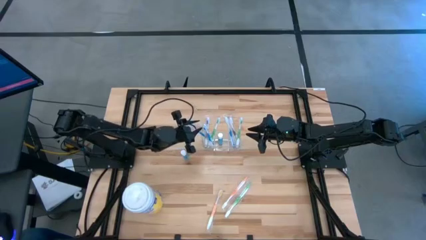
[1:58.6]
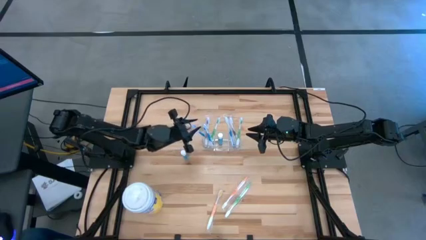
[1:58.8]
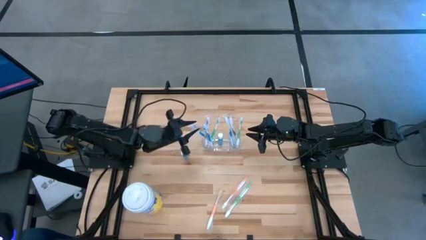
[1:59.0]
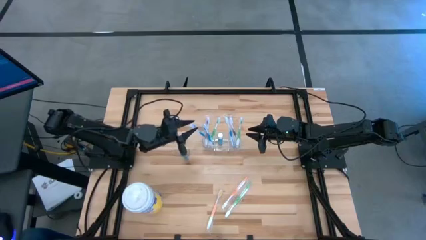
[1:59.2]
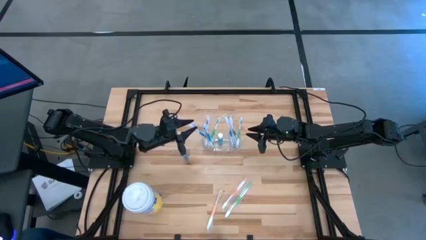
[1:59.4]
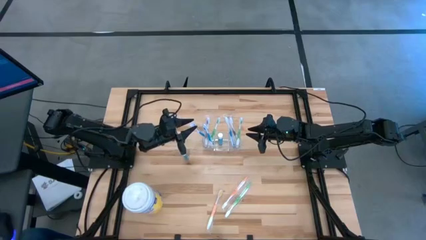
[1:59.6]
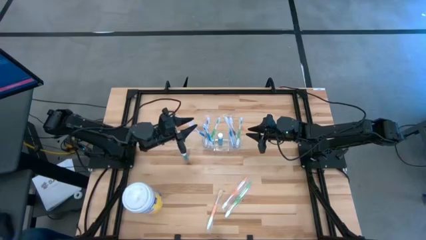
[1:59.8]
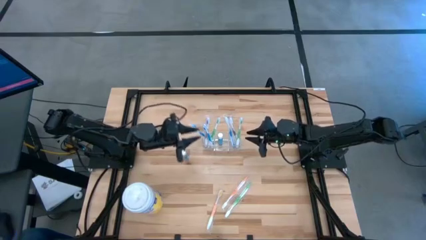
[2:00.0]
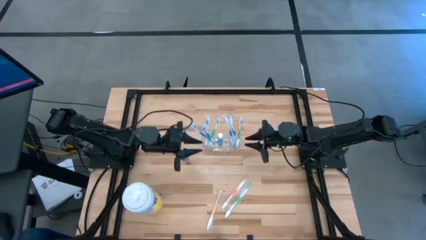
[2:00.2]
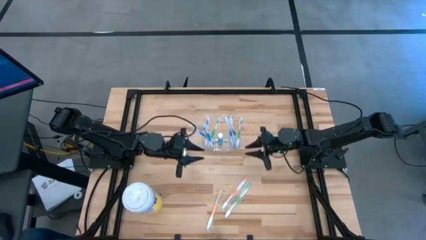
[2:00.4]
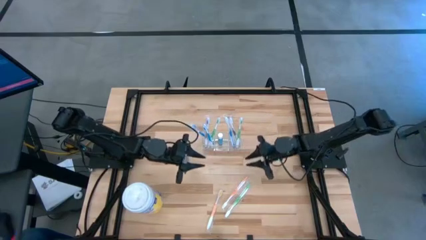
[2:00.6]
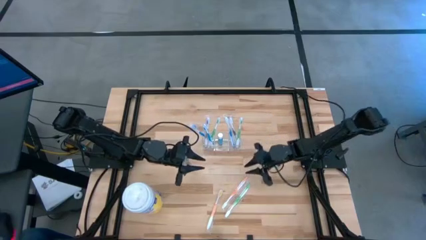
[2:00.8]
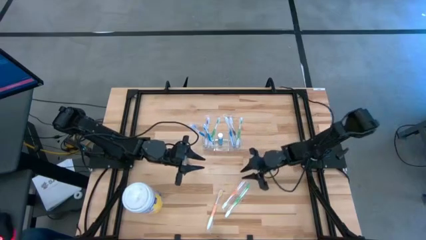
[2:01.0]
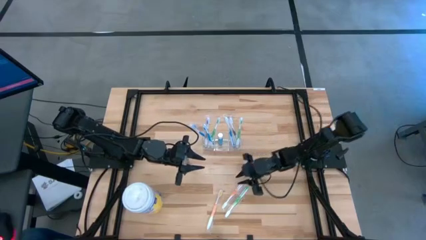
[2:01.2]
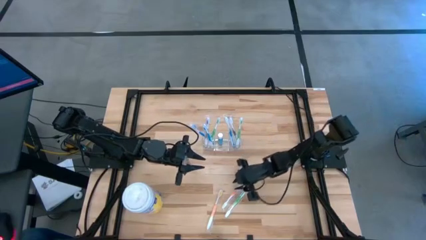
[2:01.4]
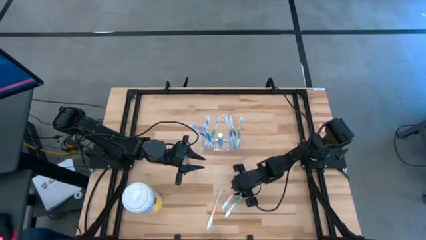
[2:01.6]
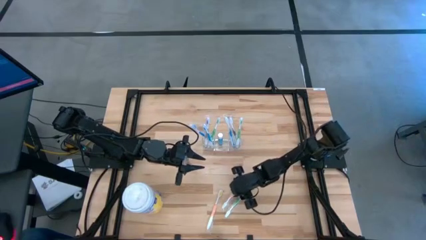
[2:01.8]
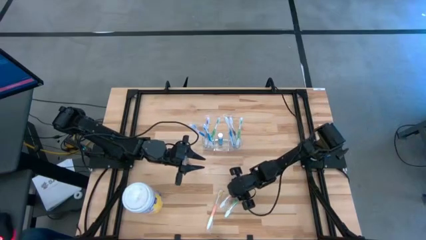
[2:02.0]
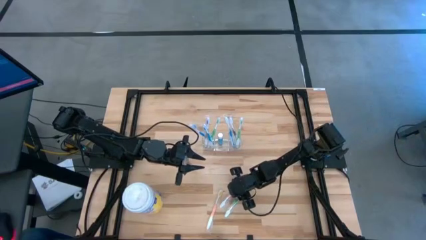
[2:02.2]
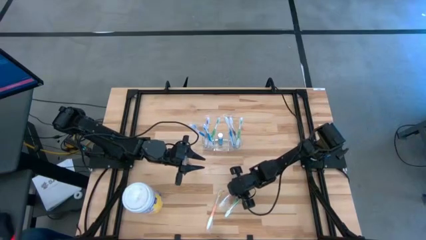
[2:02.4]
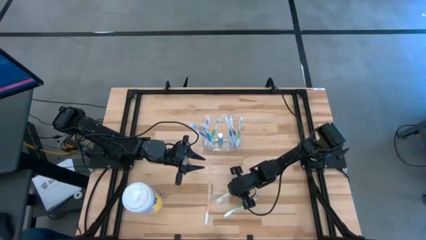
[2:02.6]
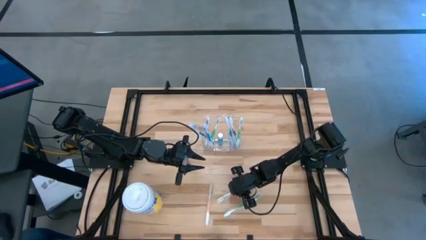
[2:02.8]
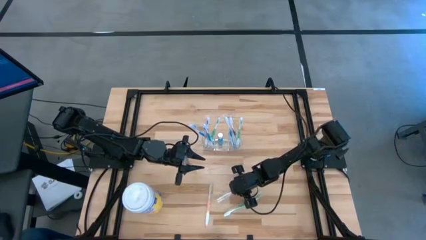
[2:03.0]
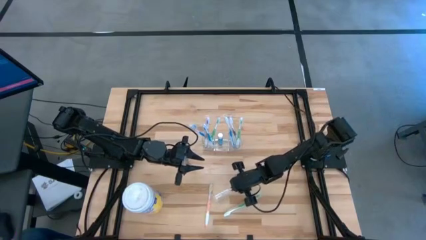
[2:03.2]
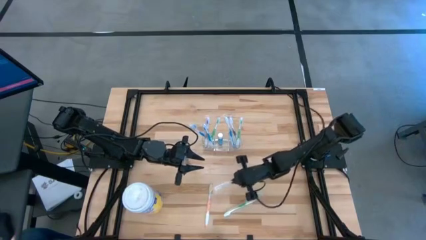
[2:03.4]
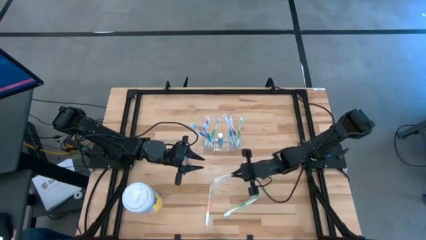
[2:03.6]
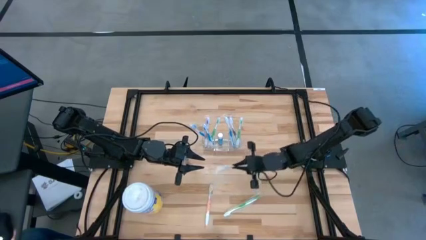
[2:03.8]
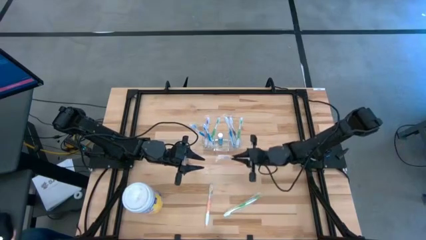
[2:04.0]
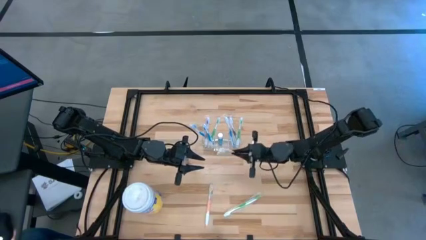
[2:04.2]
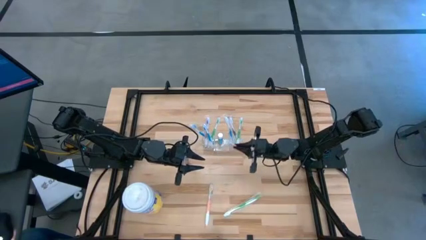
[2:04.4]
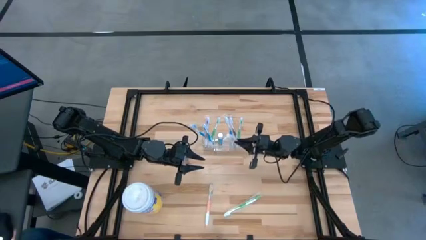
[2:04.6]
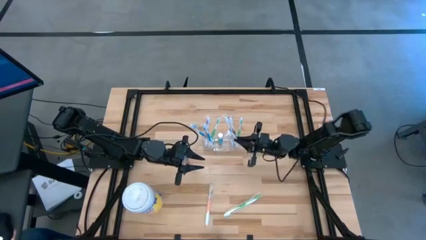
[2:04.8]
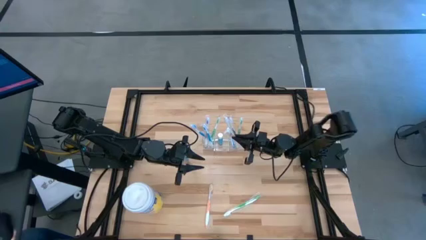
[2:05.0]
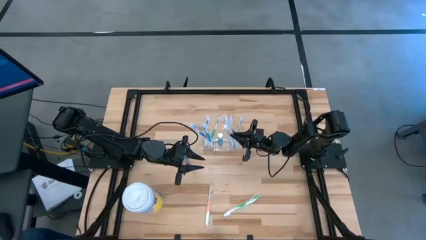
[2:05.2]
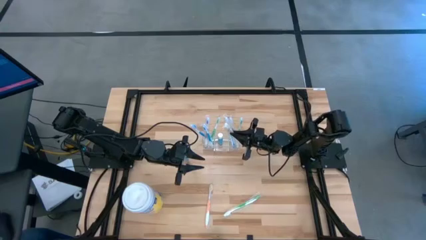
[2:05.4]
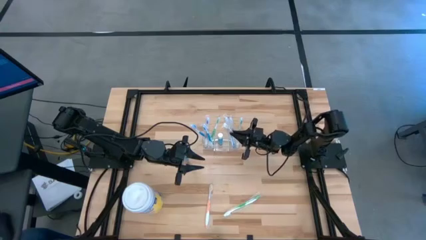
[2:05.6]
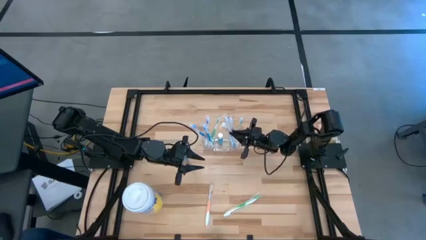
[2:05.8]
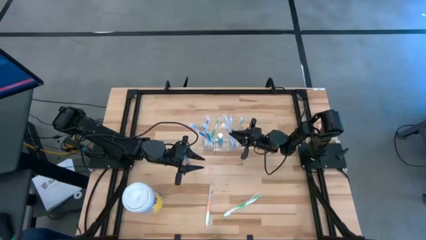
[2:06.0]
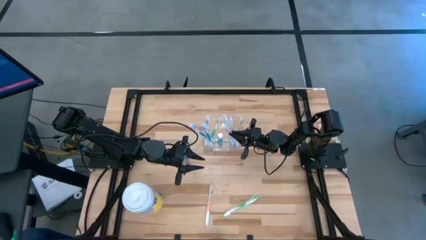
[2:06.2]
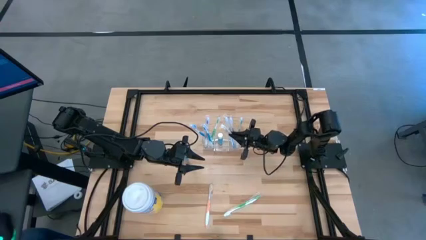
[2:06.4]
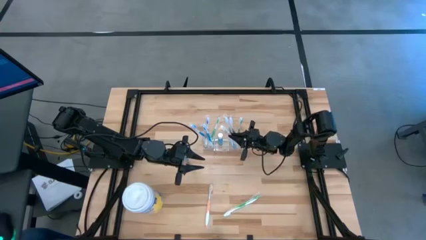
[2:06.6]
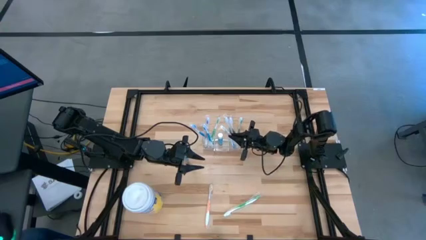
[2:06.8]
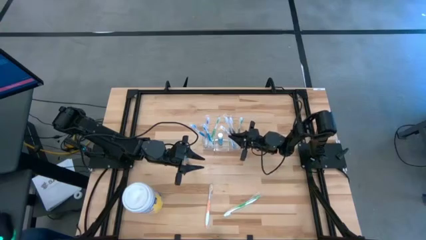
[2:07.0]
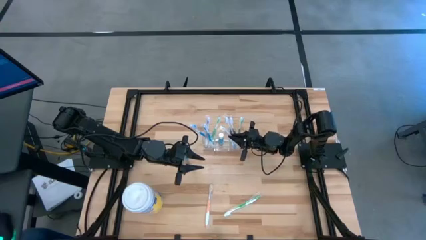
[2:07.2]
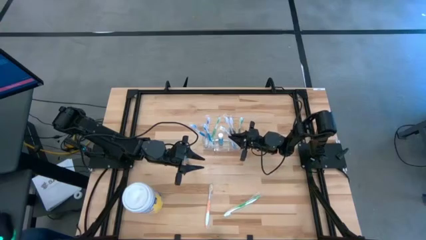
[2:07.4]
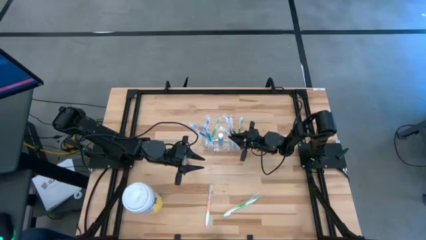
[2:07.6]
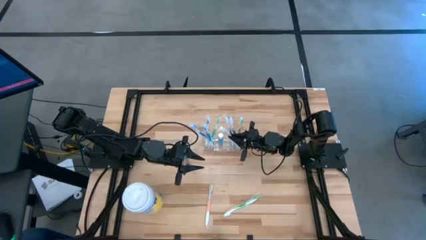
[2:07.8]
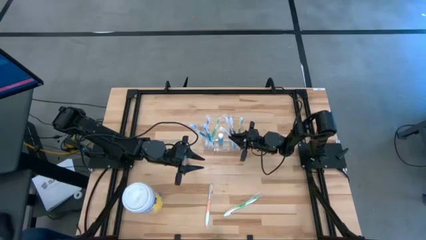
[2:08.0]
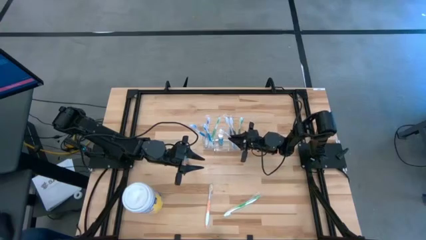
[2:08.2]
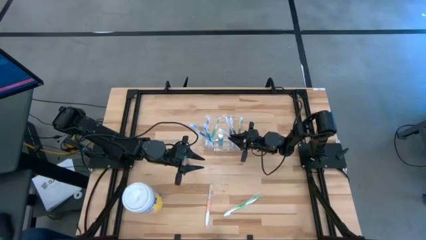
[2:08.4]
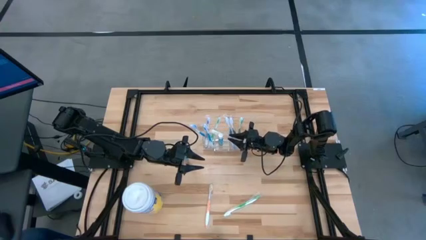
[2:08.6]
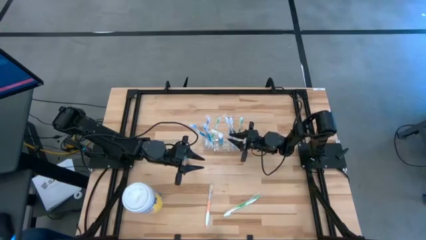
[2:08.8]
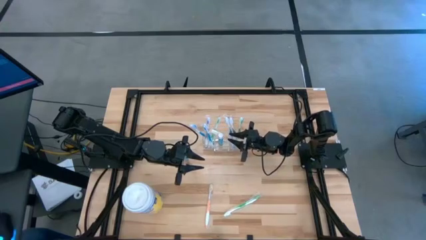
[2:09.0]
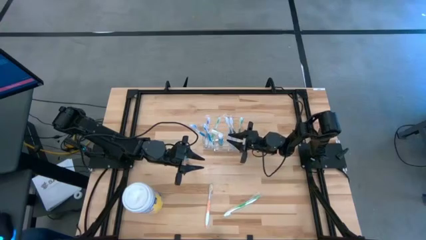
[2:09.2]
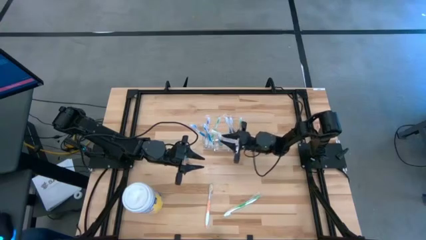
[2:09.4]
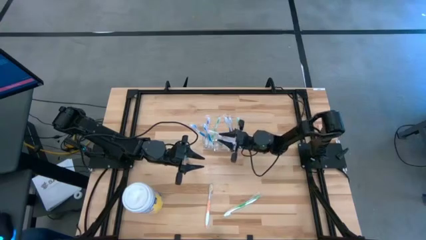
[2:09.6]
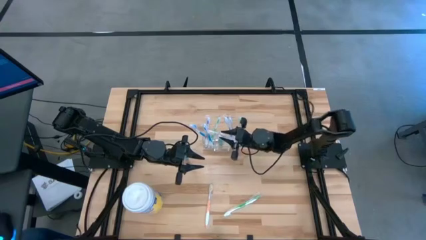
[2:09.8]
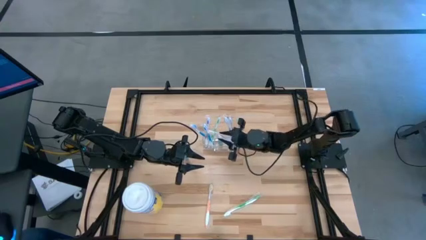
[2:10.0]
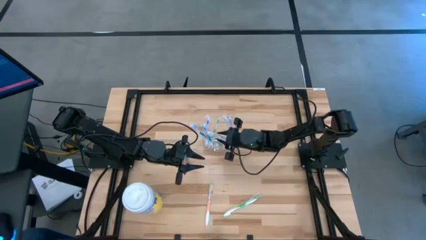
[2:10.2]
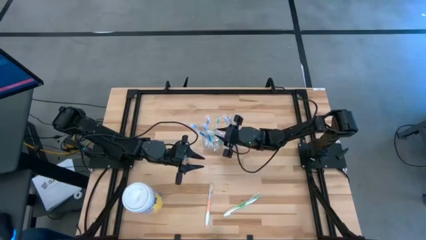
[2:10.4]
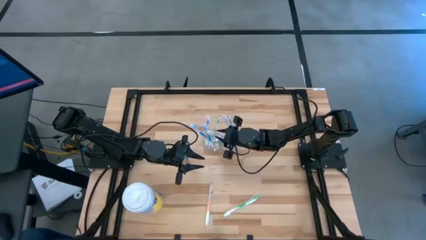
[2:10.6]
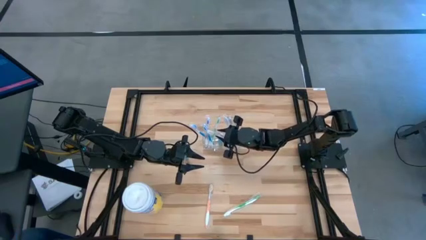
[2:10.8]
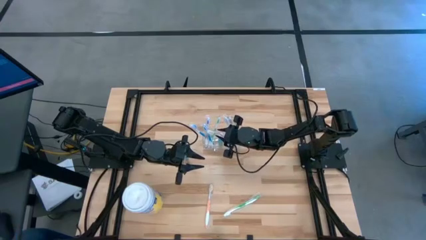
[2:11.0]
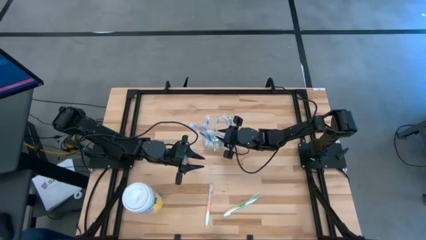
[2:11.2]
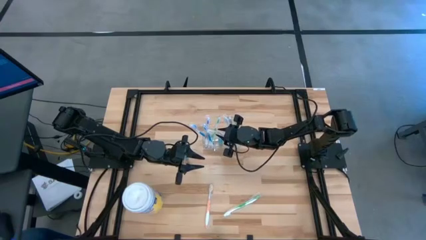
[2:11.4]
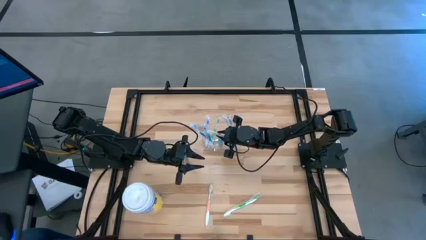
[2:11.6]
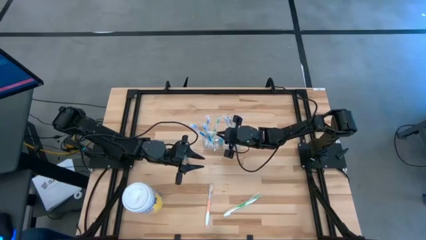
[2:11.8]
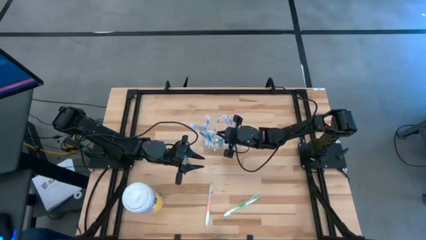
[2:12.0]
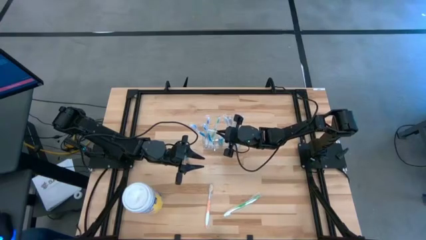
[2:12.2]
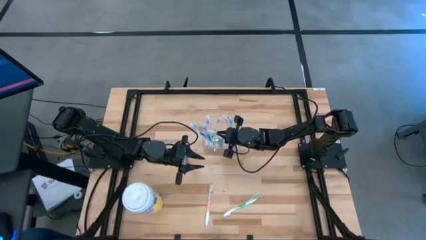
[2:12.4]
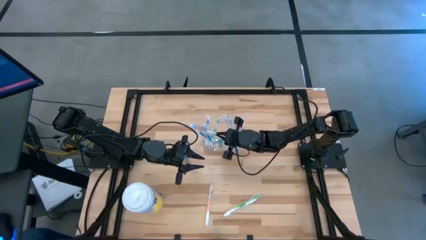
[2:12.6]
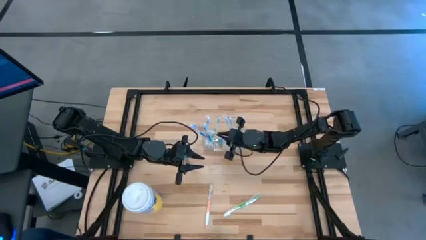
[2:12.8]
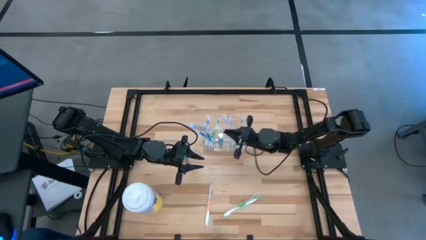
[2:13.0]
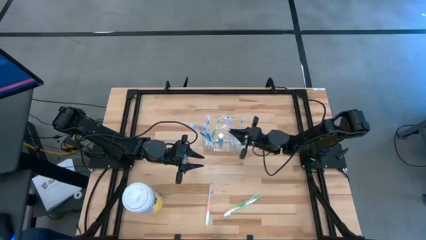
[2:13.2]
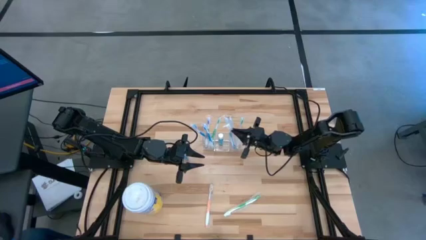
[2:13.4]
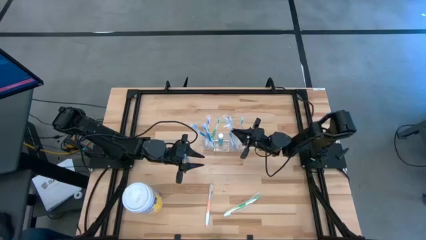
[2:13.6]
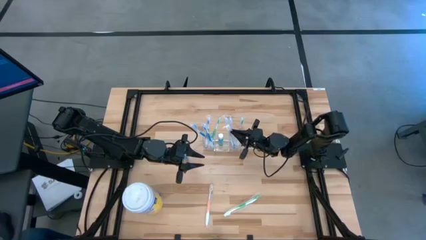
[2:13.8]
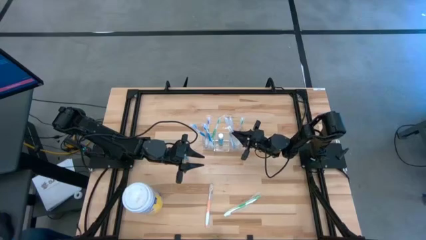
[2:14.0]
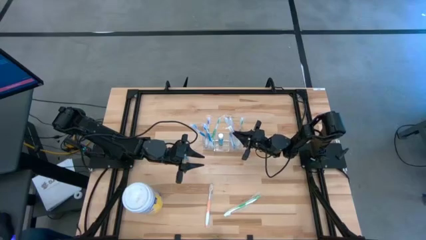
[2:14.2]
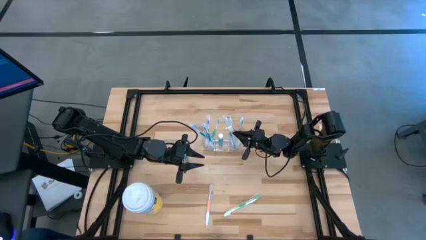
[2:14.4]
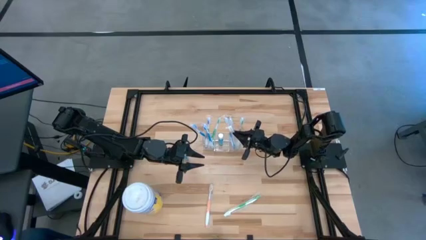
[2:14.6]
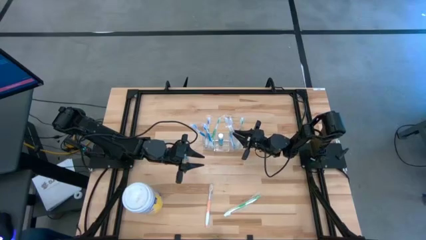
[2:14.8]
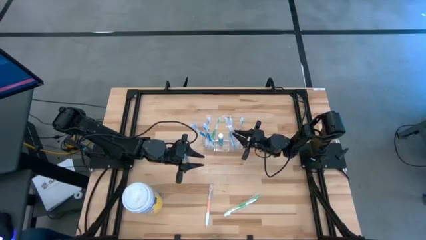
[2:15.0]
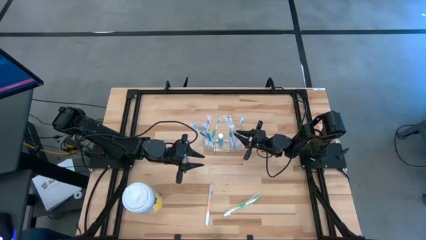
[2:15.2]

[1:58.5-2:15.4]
Task: Pick & Place toothbrushing station
Put the orange toothbrush into the transparent organizer
